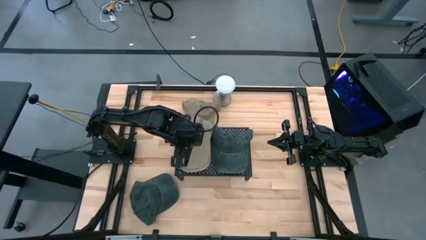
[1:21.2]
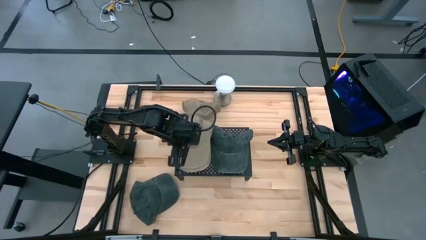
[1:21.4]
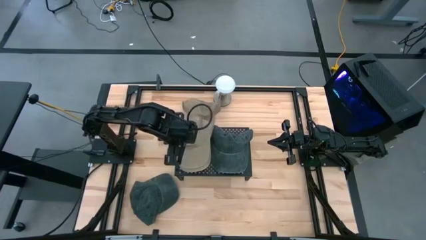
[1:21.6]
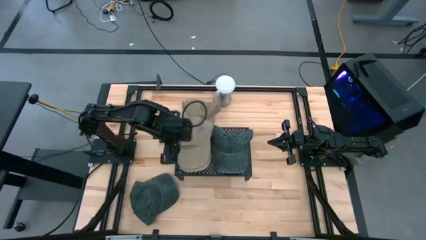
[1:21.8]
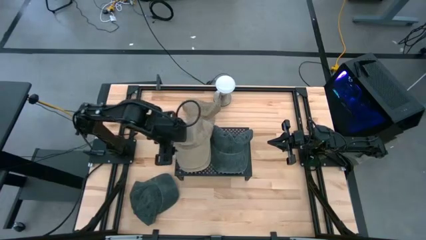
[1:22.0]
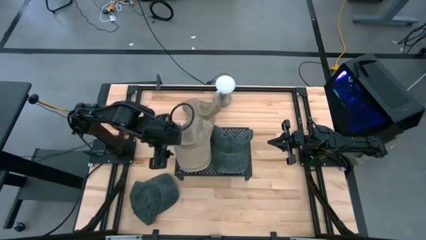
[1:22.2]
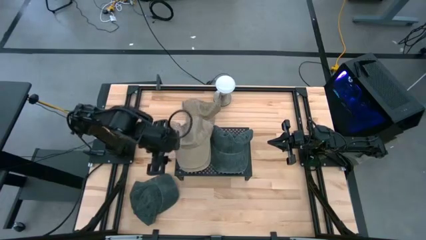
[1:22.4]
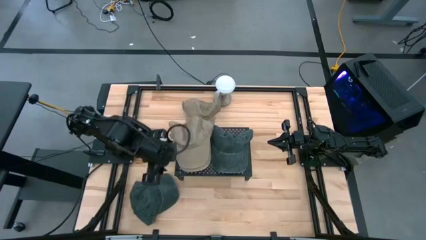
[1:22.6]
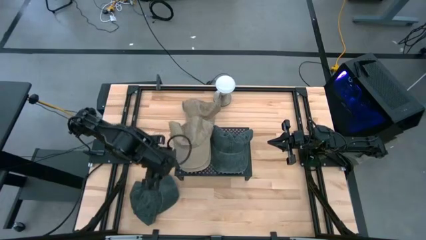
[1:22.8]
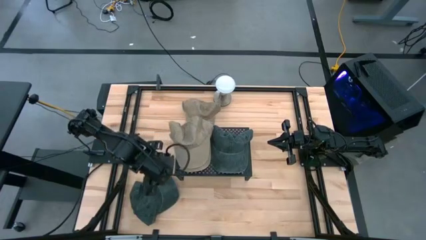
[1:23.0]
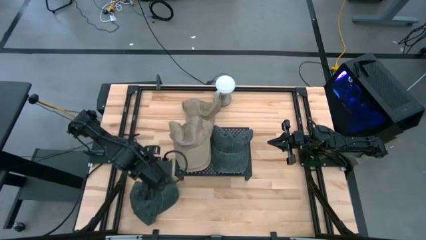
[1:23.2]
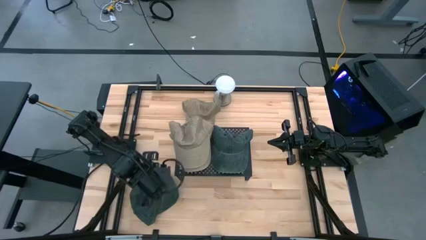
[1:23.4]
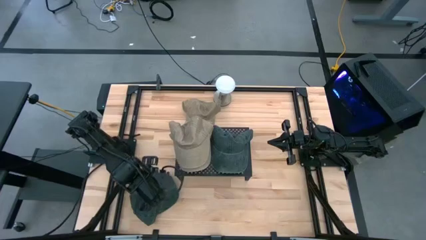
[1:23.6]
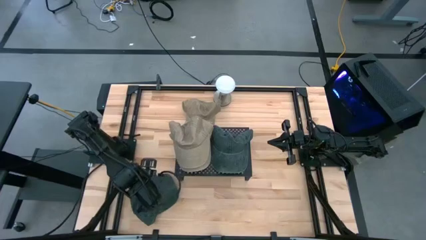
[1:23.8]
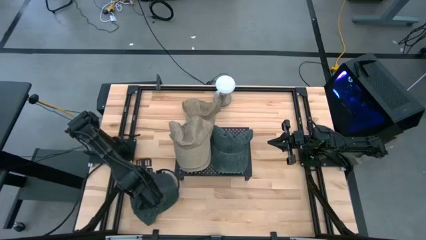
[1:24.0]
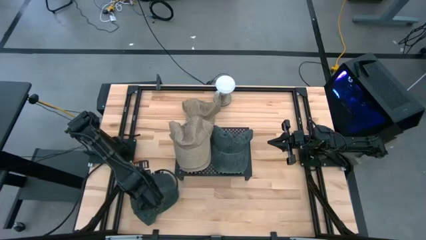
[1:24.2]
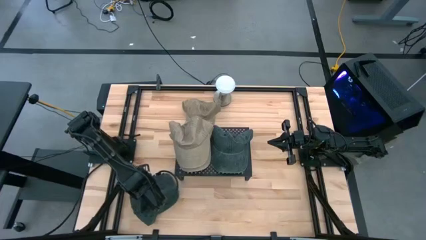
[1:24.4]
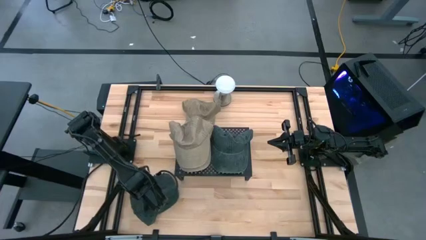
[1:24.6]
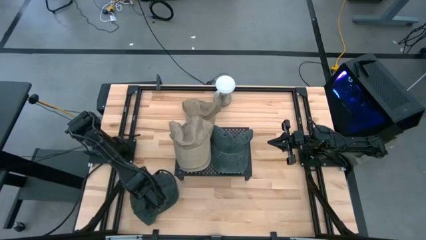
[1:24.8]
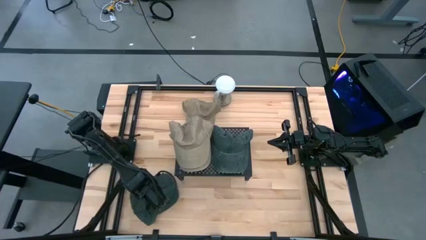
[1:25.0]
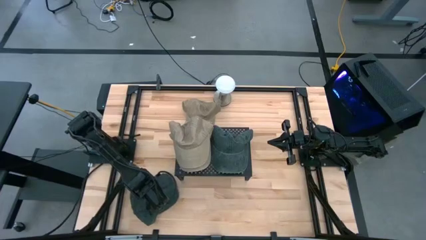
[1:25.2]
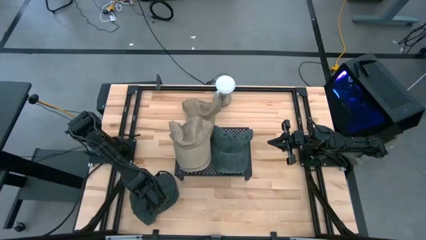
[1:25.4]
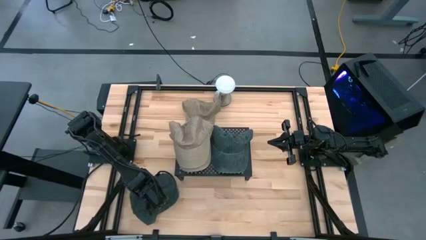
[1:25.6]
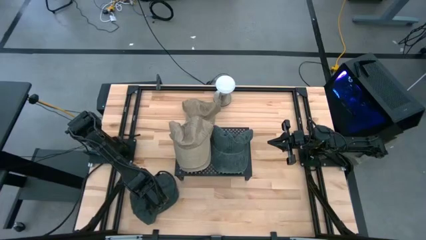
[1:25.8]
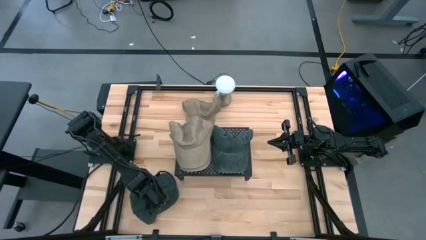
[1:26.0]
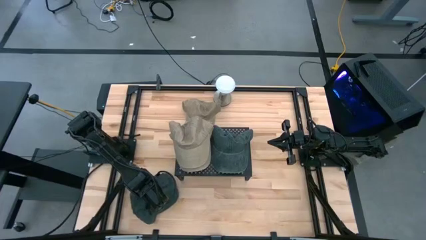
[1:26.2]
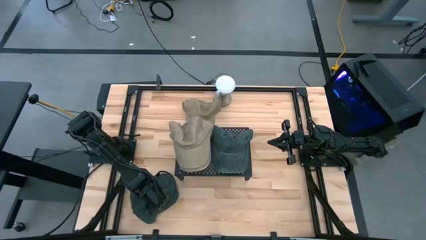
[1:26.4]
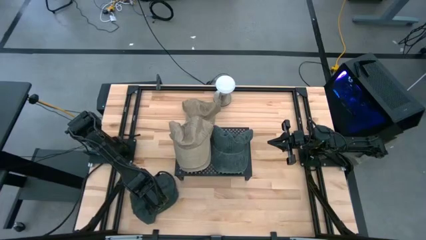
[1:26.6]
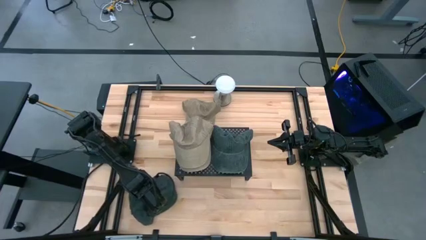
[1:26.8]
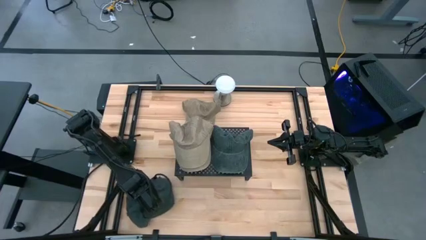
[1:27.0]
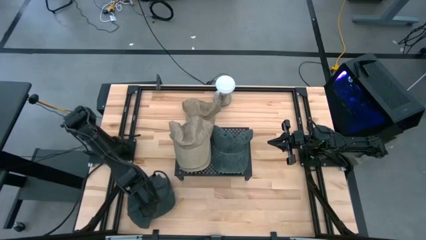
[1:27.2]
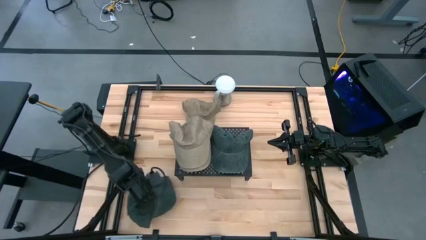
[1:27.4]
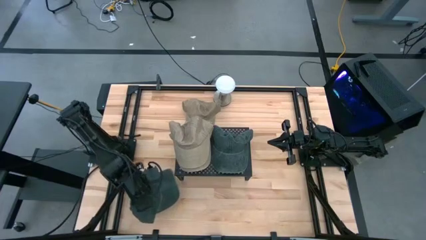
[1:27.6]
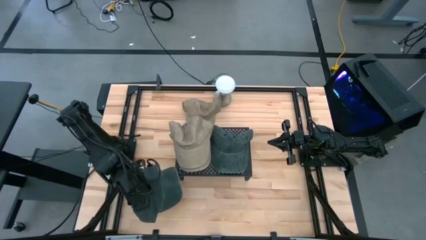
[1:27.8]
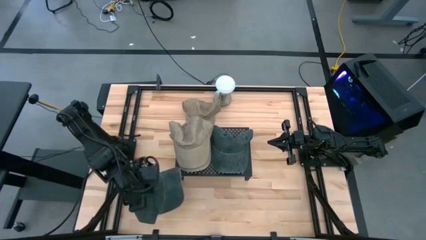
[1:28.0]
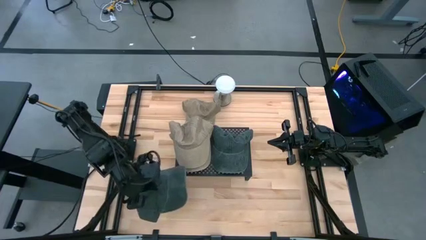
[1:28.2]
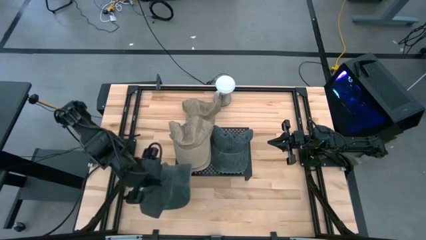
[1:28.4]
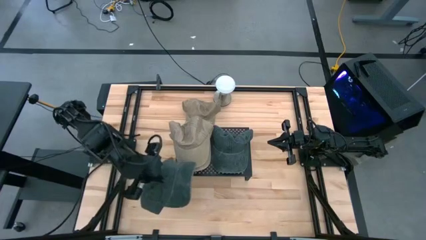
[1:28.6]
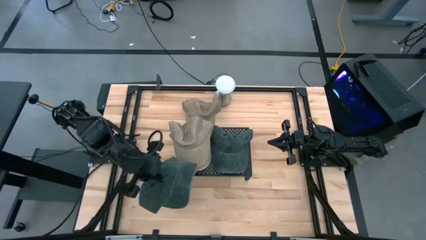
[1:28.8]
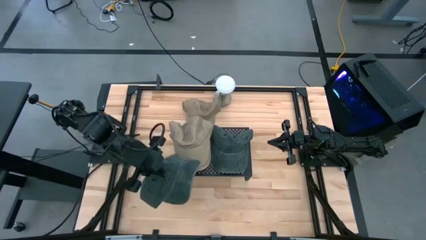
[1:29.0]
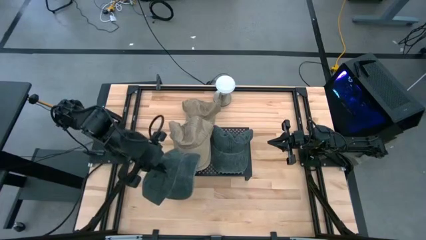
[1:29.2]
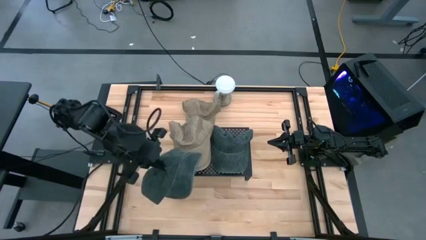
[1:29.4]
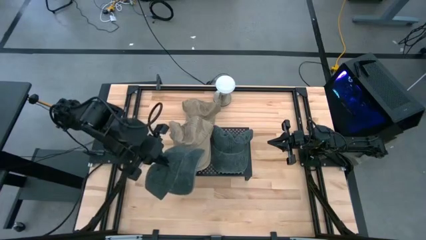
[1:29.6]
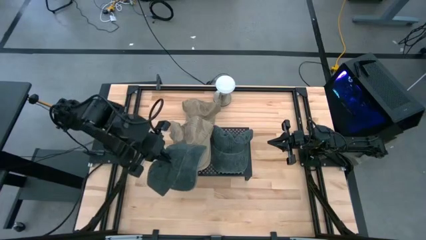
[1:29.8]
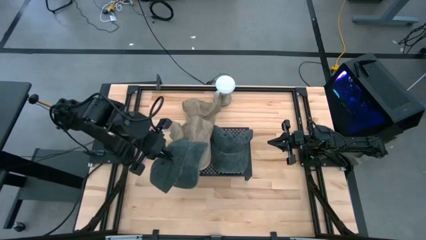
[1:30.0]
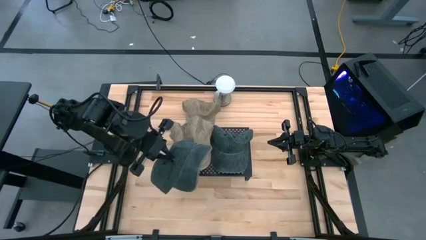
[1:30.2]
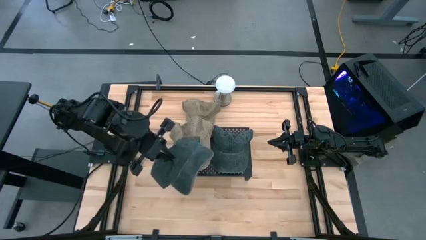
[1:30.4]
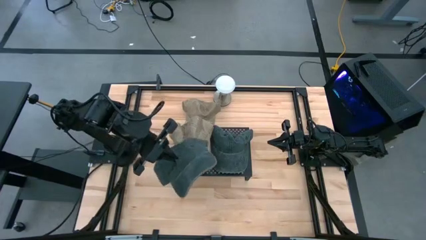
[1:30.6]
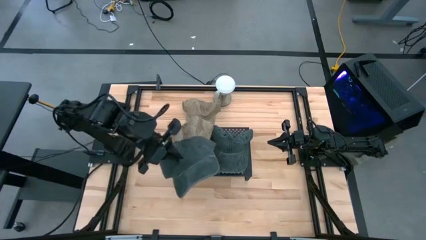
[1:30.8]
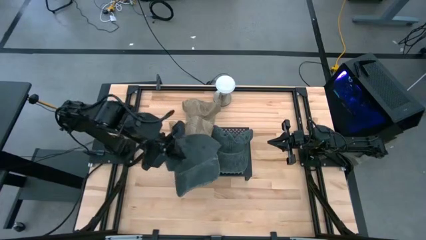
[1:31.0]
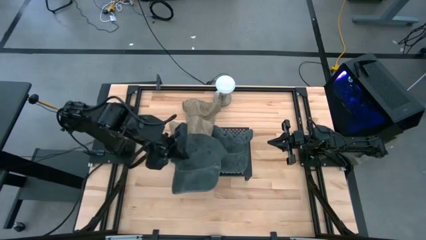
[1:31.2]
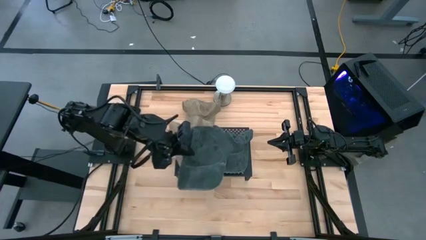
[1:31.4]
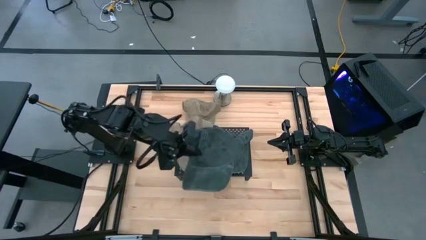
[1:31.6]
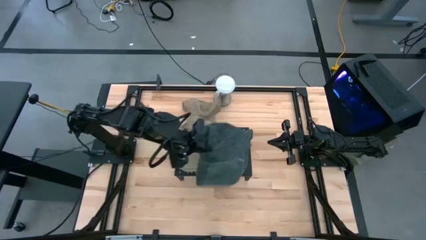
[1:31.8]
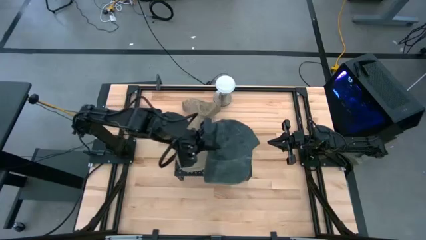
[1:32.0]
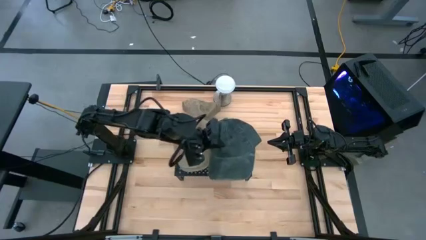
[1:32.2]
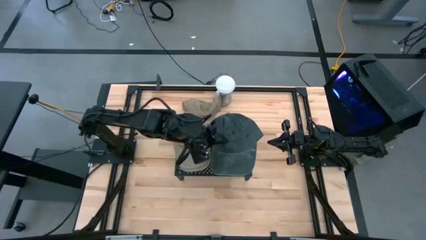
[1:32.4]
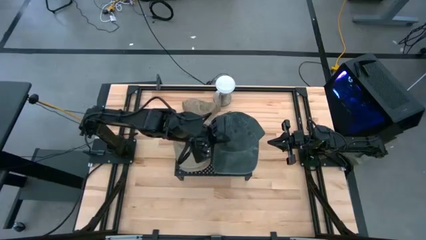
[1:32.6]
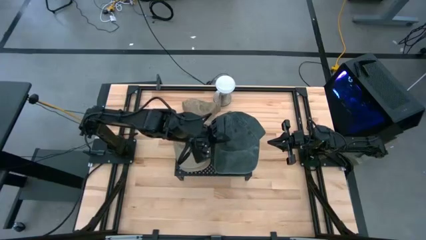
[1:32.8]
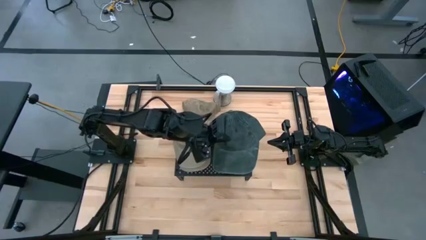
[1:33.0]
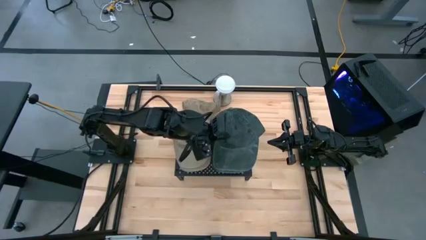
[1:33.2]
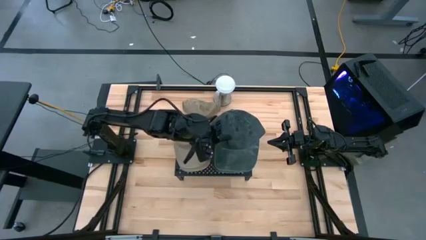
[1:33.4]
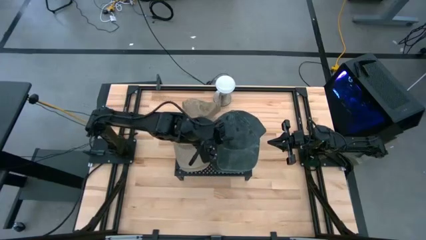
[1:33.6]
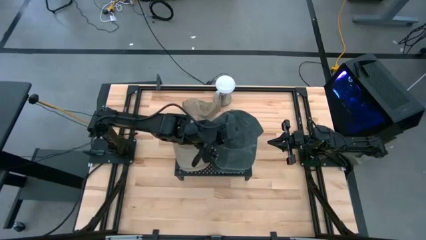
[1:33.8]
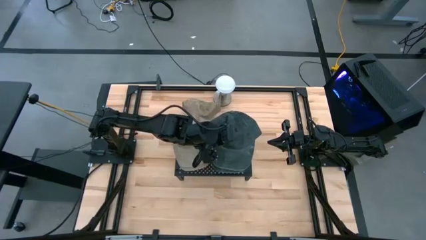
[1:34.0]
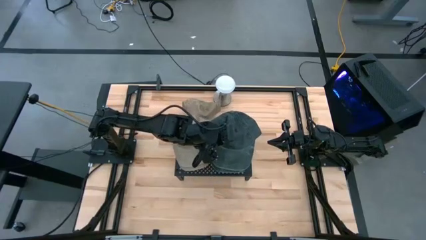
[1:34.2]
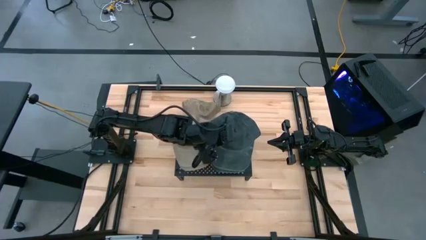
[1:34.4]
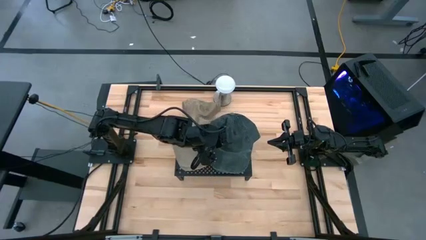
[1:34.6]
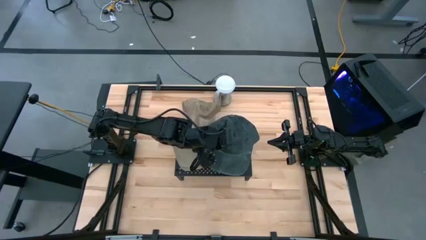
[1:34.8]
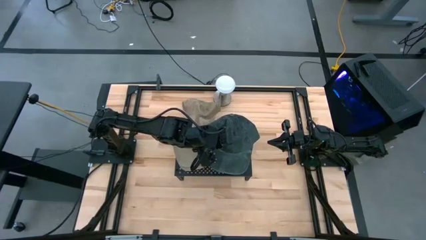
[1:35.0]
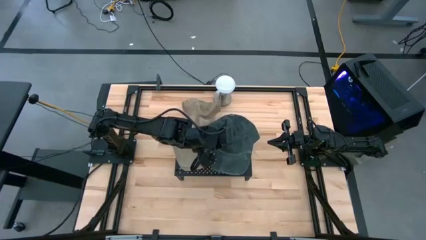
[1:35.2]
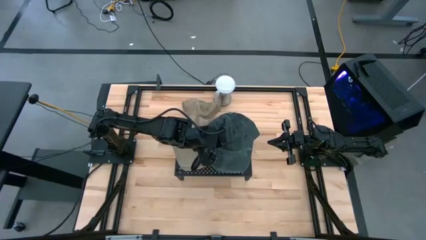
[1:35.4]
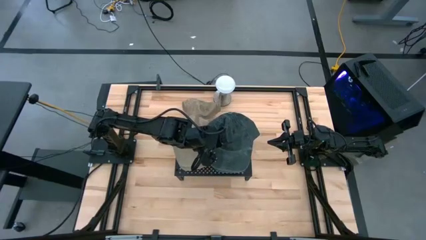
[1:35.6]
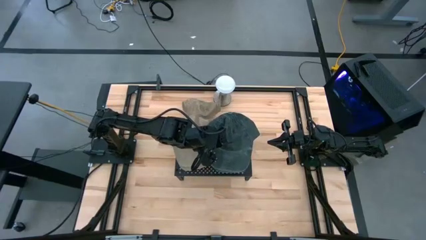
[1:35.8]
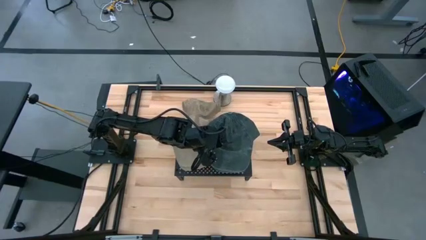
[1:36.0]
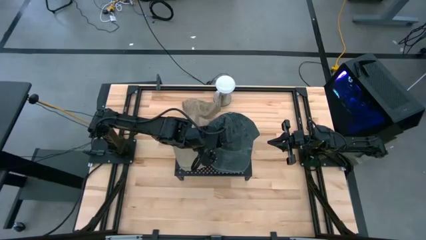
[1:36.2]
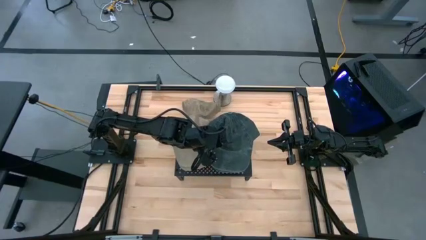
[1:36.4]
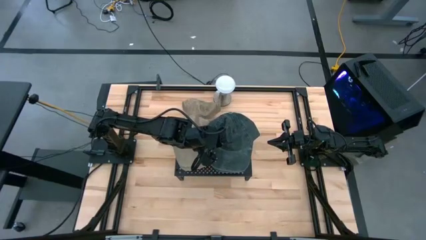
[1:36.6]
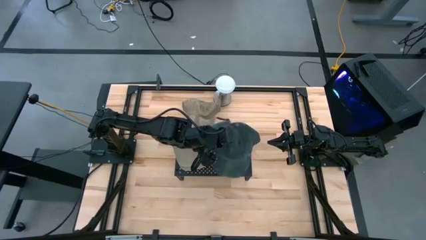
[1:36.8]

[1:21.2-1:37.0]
Task: Pick & Place hat
Stack the black cap on the black cap on the shelf
